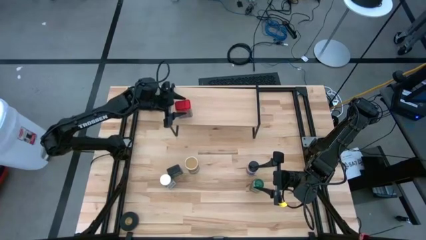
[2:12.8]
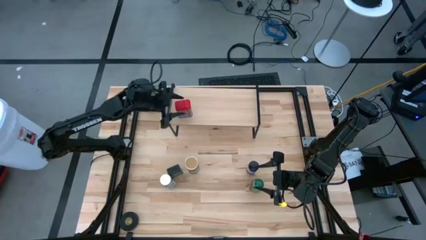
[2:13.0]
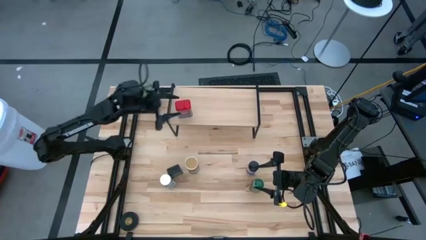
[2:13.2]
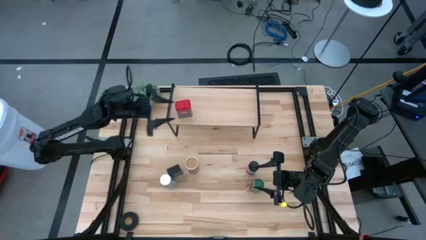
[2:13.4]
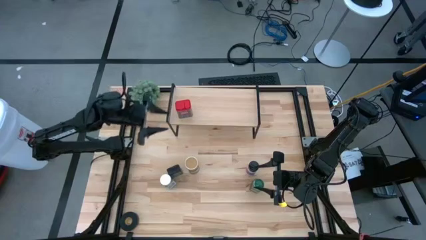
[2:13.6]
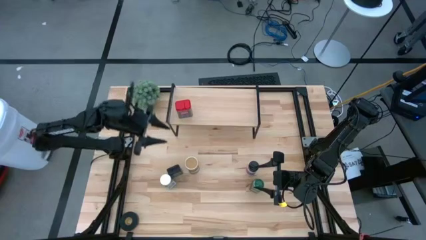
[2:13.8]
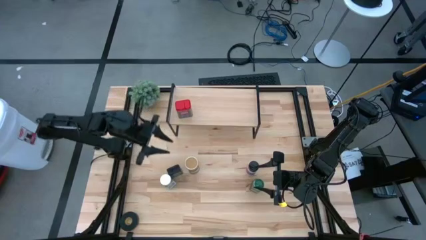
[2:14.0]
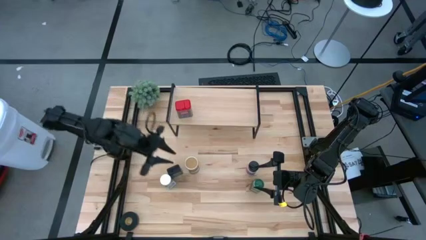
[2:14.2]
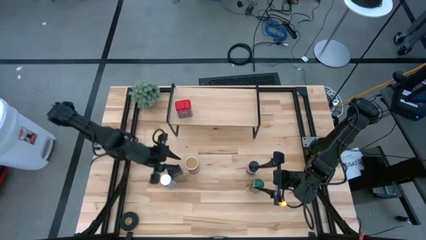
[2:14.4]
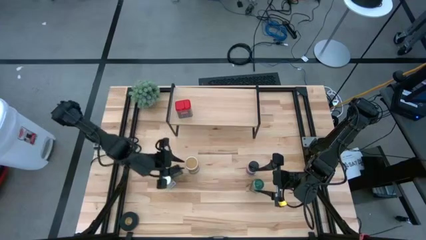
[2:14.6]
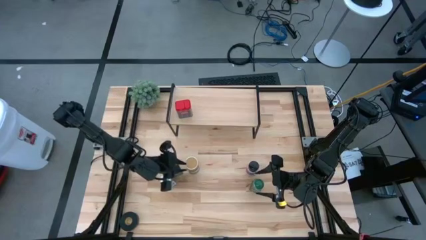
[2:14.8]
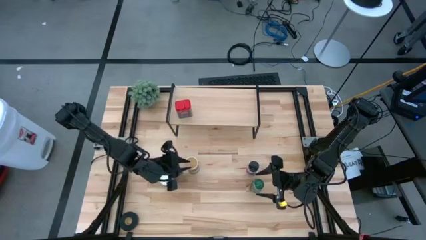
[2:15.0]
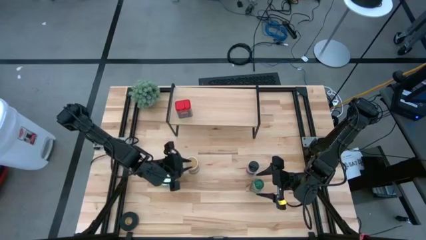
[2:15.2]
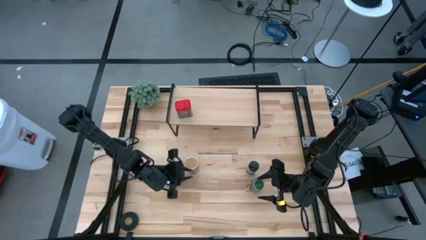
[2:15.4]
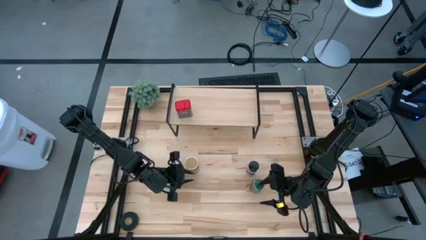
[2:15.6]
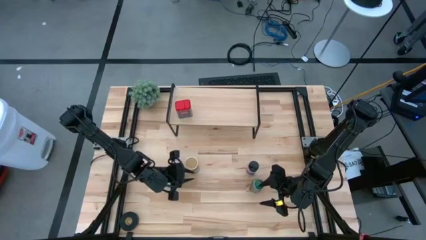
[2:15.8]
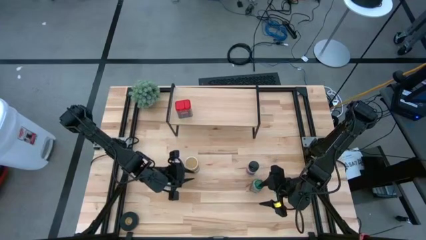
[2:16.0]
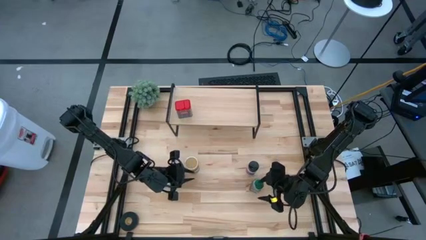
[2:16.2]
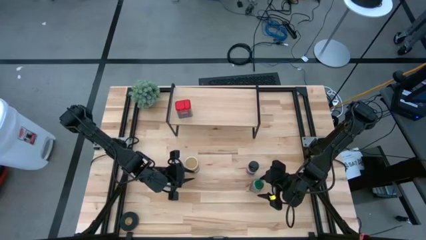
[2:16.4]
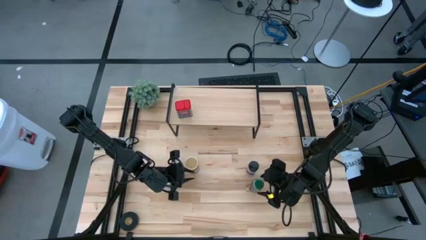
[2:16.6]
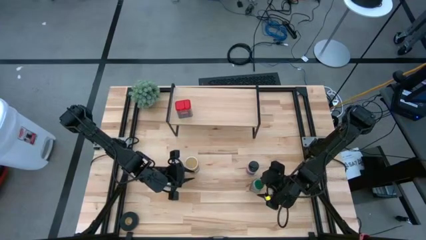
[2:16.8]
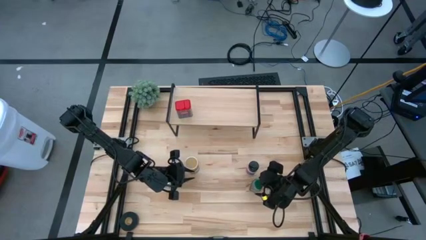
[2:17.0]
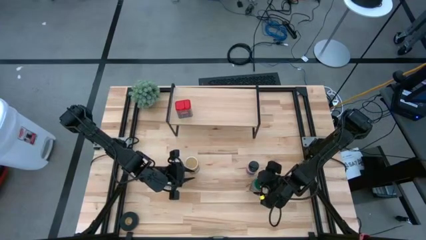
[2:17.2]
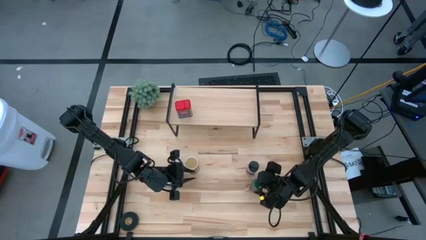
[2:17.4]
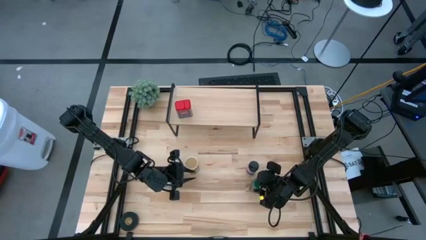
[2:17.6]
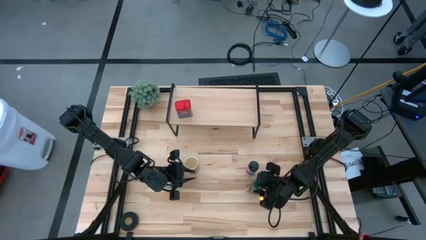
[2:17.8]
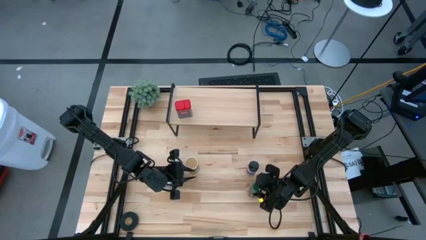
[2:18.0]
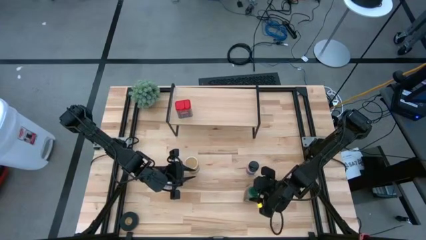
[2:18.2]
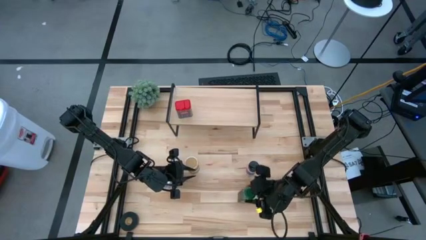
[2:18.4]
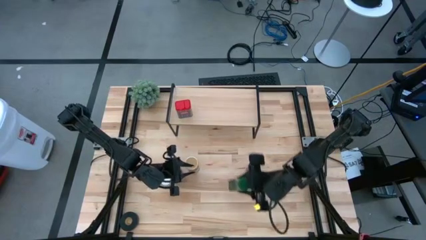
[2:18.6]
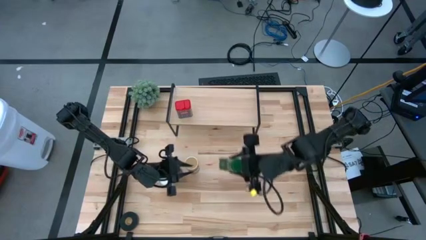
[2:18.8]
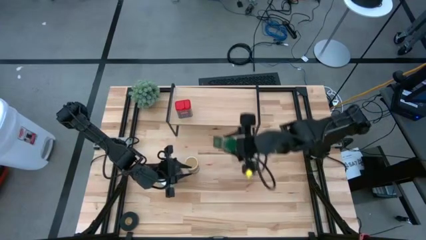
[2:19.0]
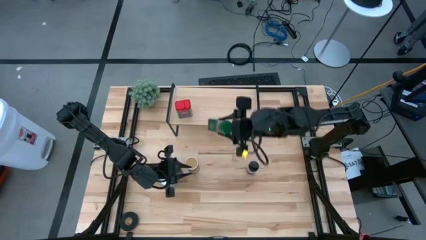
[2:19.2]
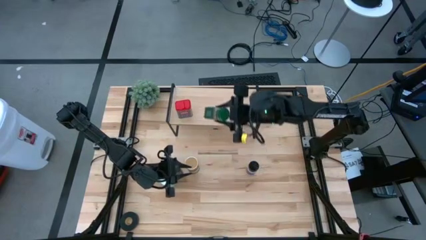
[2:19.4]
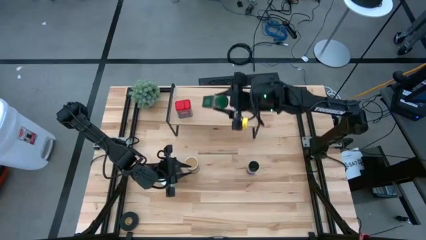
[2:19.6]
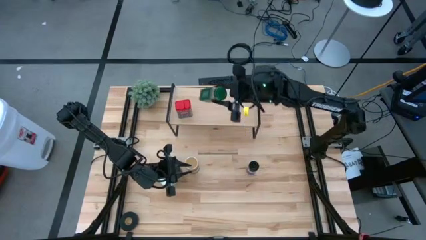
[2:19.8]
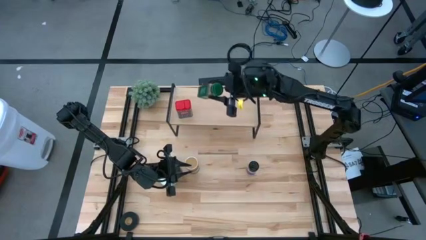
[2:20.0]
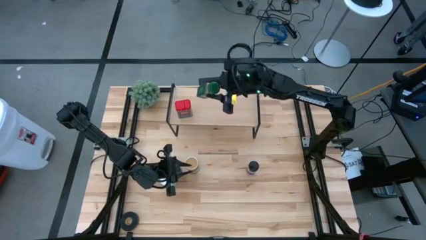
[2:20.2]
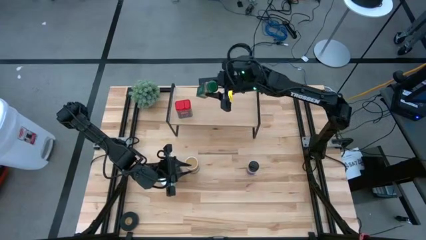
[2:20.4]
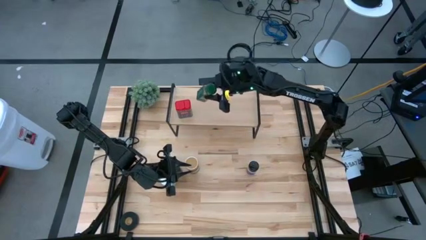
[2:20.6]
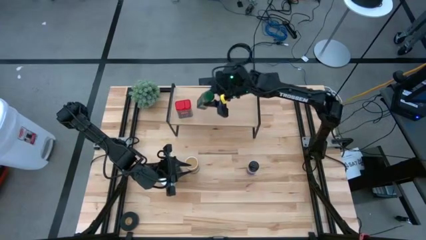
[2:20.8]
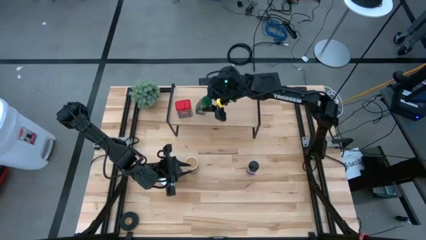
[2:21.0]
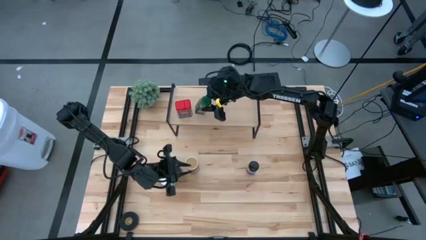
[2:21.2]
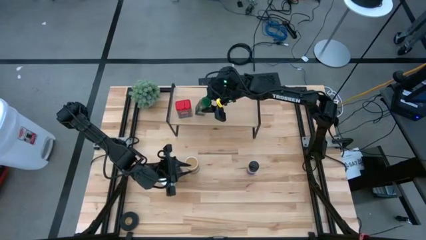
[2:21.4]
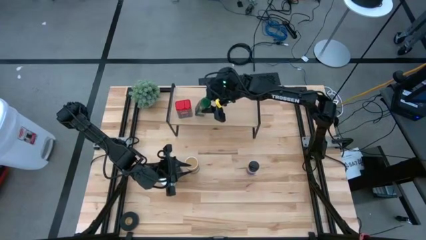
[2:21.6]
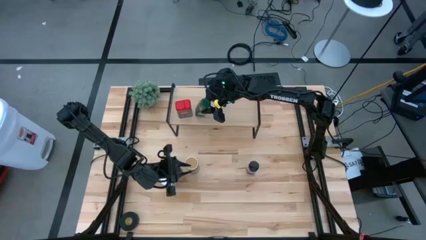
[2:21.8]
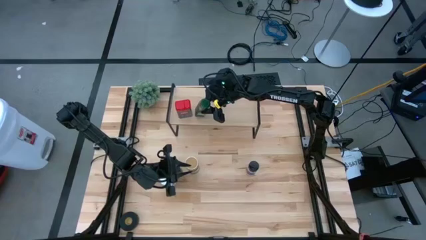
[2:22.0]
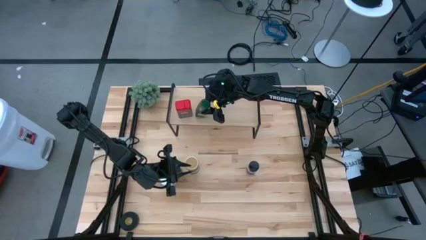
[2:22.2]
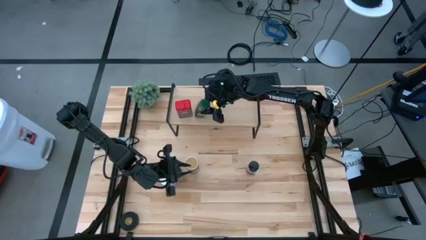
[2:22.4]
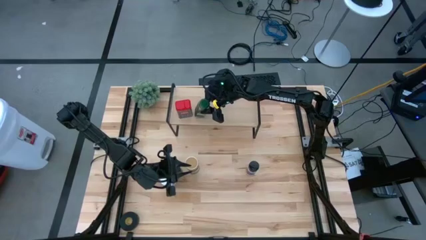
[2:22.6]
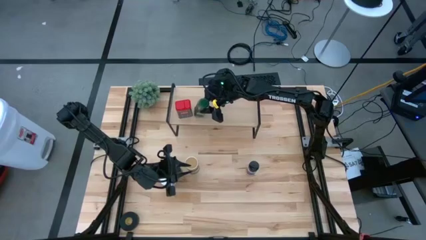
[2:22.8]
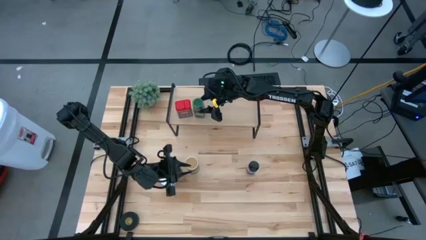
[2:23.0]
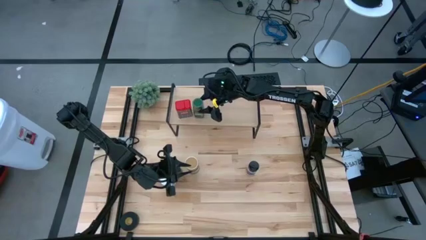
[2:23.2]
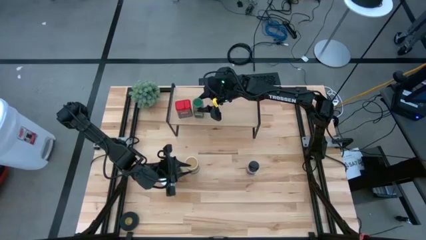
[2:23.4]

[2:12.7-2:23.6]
Task: Shelf spices
Put the green seasoning bottle on the shelf aligned with the other red seasoning can

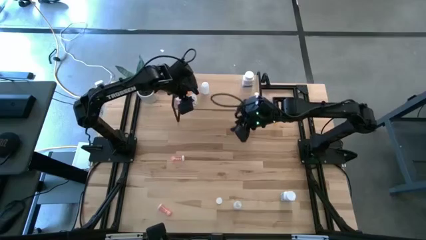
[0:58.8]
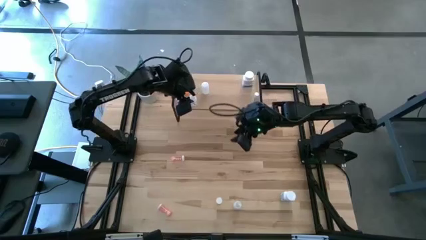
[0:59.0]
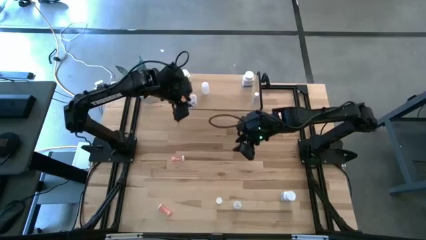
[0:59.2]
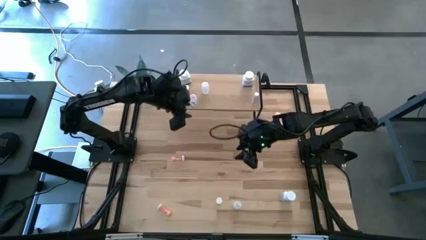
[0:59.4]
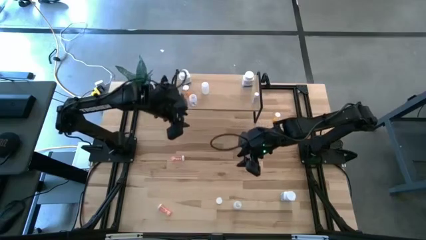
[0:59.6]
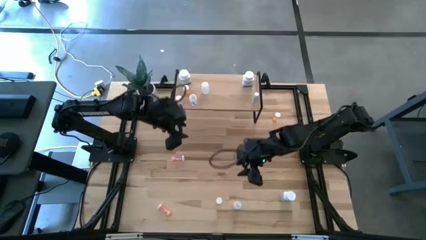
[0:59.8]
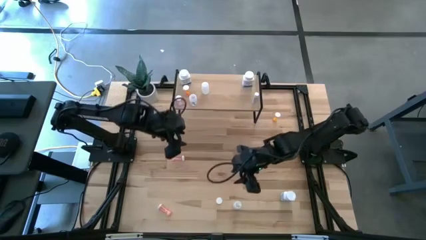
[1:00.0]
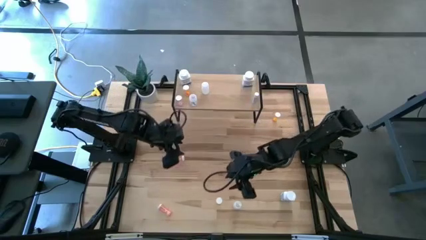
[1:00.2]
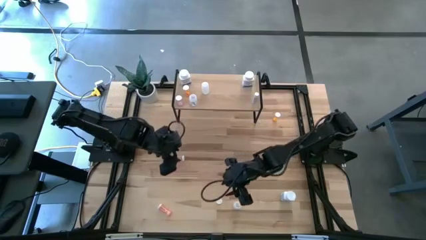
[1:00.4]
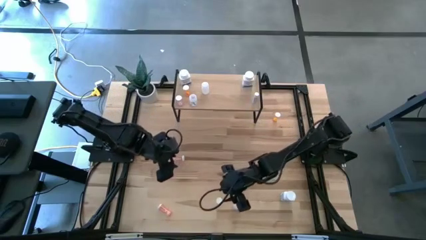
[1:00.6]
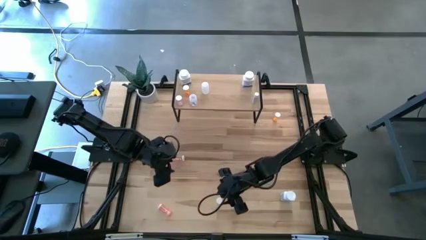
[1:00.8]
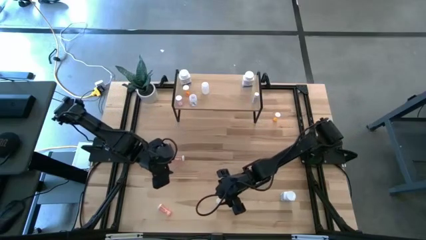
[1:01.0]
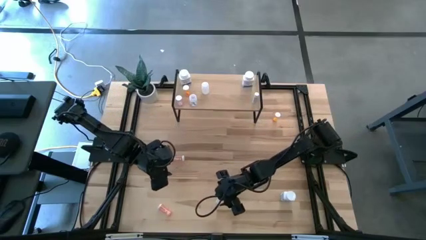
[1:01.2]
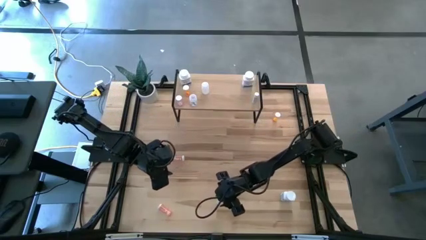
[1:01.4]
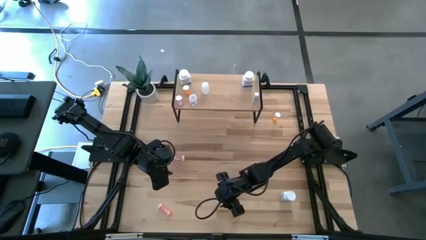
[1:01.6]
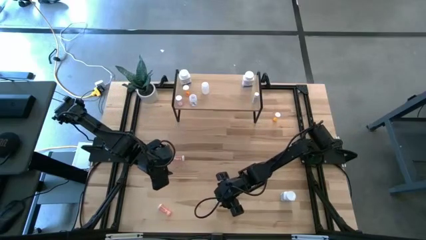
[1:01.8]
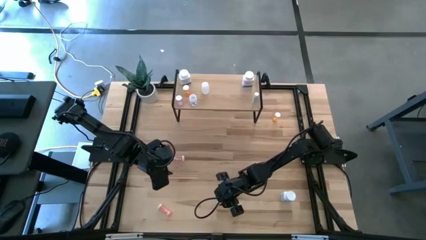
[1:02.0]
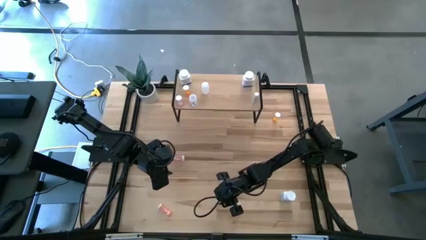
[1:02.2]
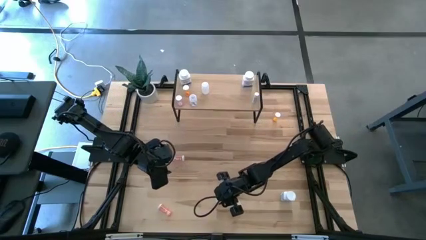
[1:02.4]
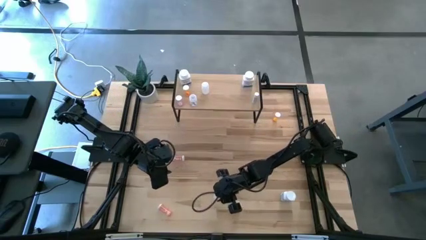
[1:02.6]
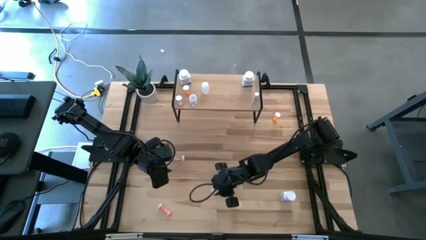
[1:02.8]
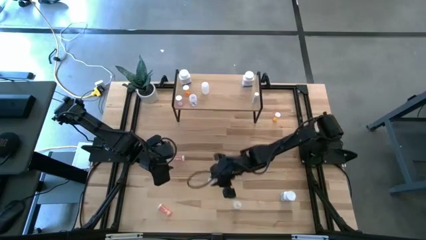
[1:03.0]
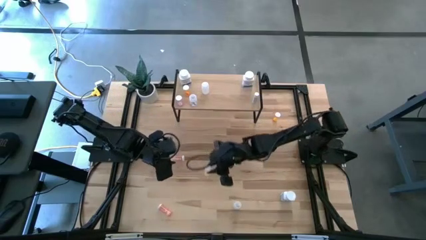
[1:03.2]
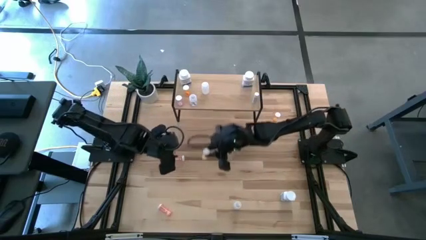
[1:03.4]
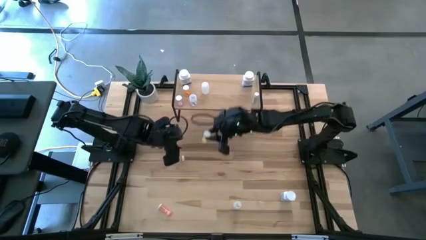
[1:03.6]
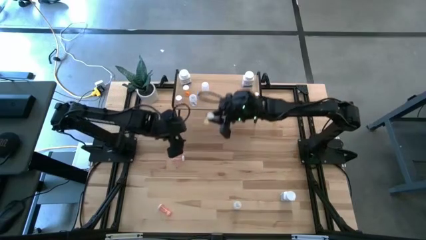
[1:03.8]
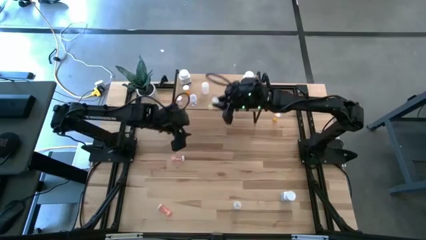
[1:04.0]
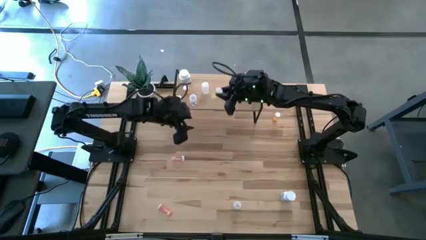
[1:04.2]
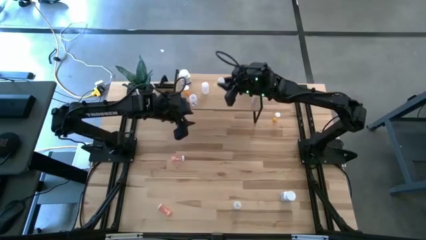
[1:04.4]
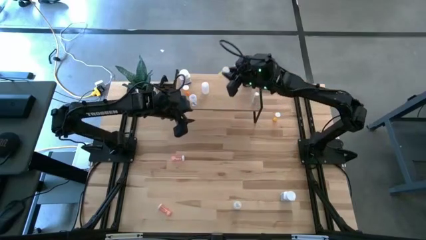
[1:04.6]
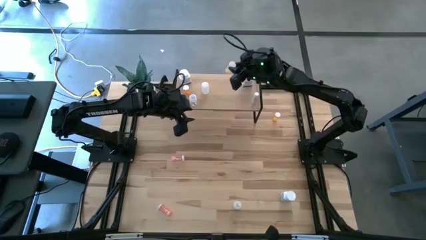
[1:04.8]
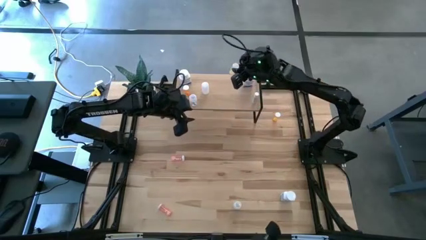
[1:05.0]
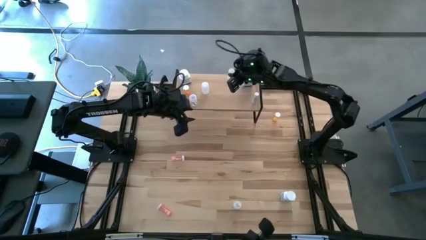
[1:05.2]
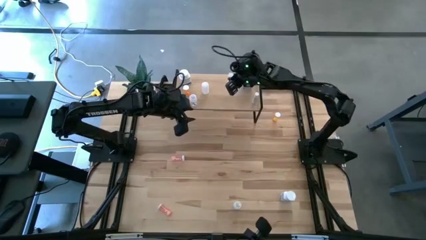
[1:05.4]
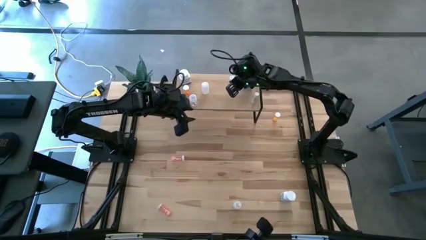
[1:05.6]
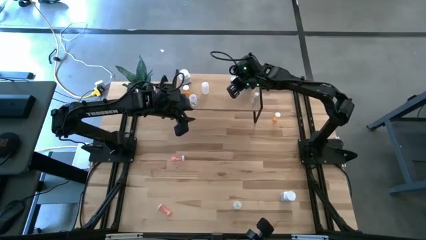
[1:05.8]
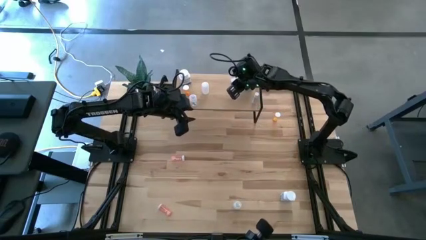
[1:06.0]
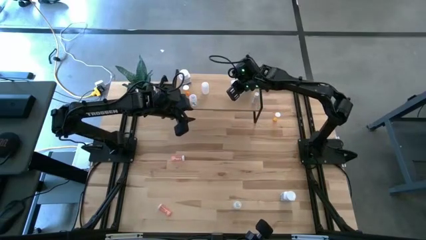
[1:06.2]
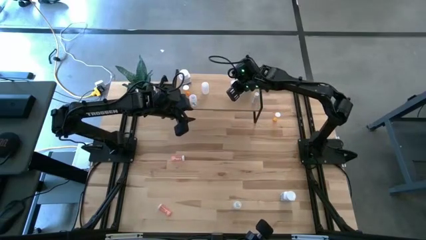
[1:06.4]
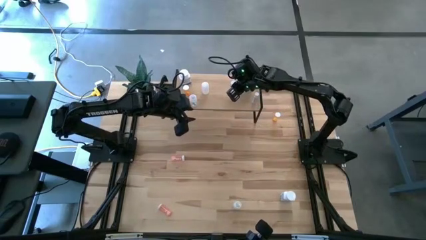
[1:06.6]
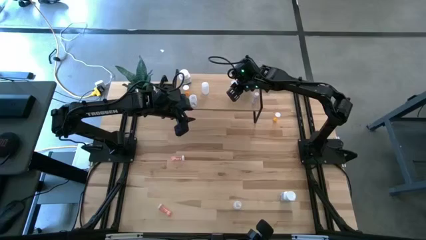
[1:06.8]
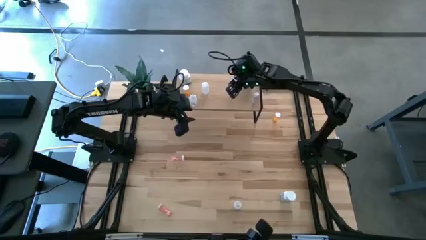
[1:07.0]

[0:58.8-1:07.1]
Task: Pick and place medicine bottles onto shelf by color
Put the yellow transparent pill bottle on the shelf
